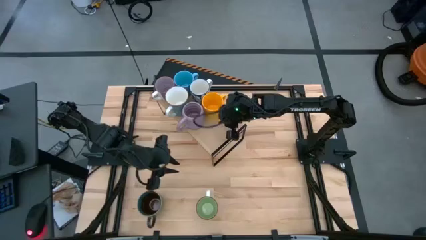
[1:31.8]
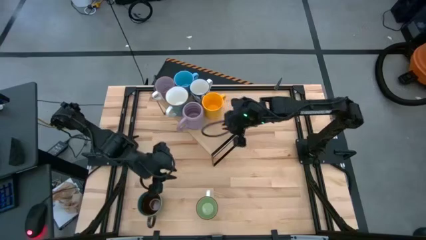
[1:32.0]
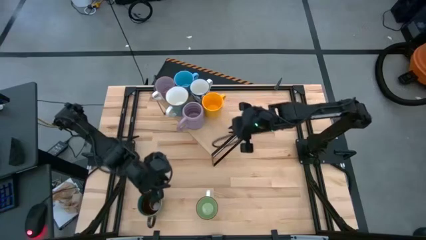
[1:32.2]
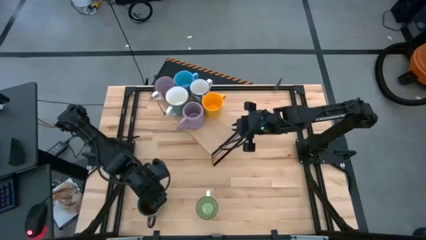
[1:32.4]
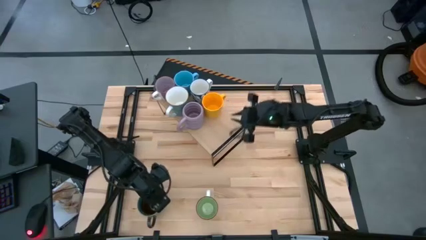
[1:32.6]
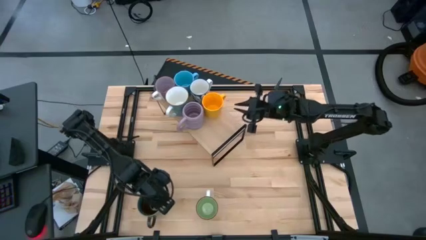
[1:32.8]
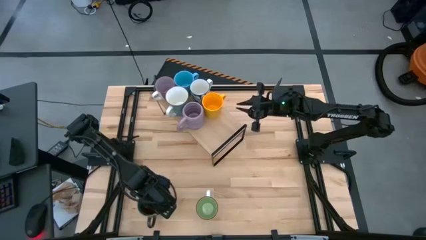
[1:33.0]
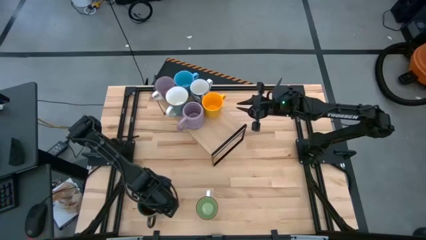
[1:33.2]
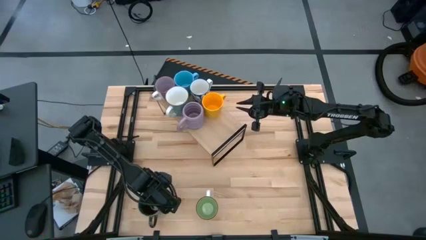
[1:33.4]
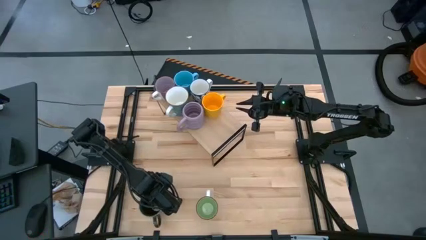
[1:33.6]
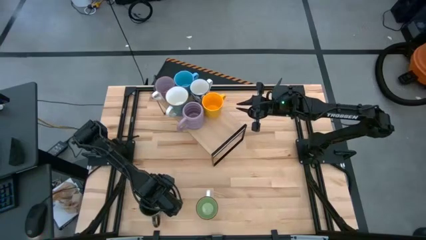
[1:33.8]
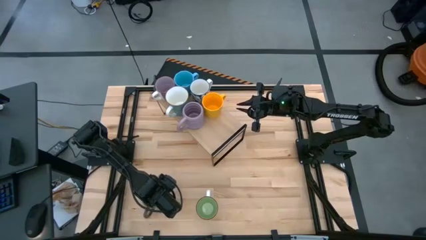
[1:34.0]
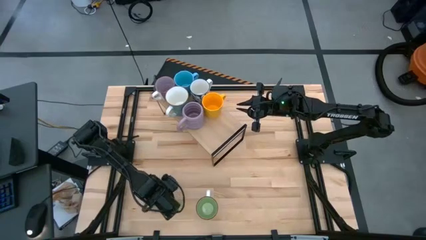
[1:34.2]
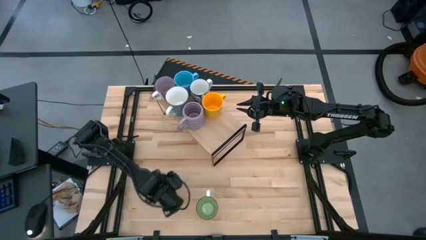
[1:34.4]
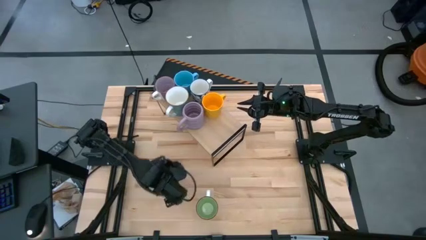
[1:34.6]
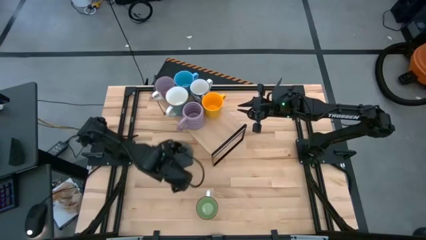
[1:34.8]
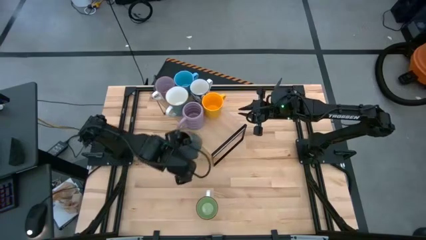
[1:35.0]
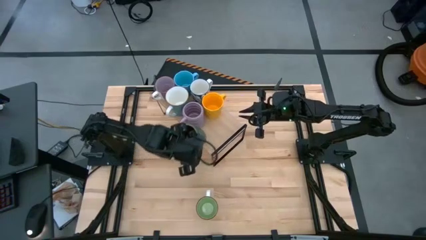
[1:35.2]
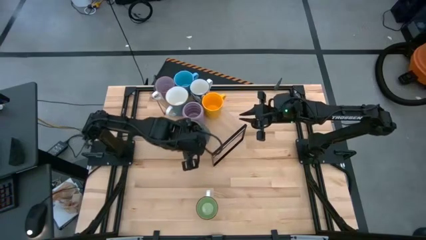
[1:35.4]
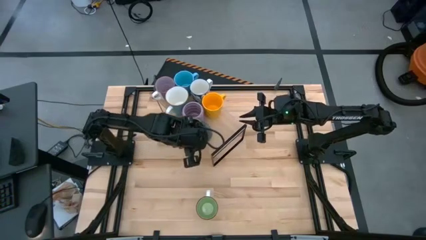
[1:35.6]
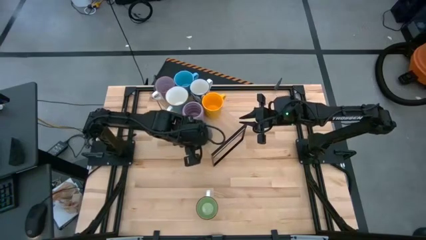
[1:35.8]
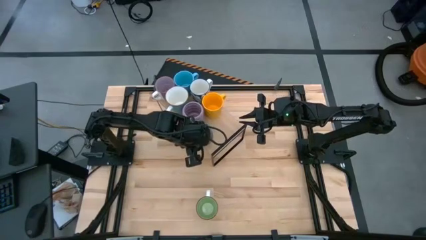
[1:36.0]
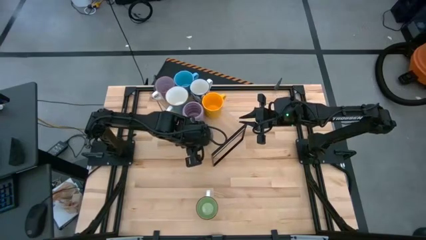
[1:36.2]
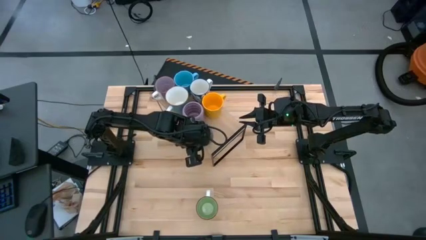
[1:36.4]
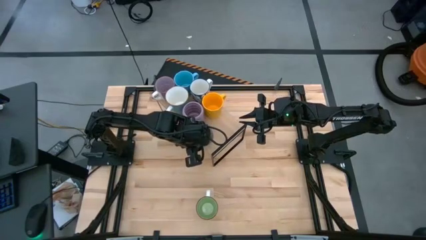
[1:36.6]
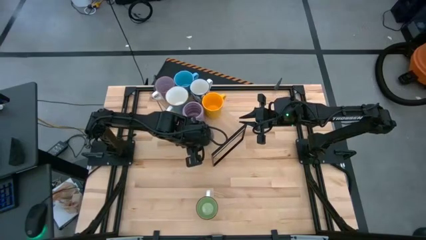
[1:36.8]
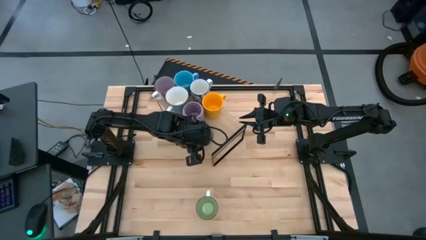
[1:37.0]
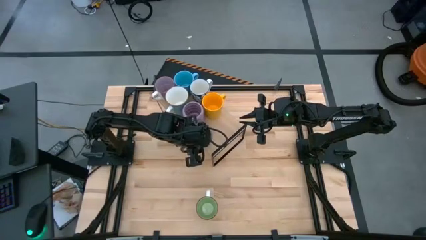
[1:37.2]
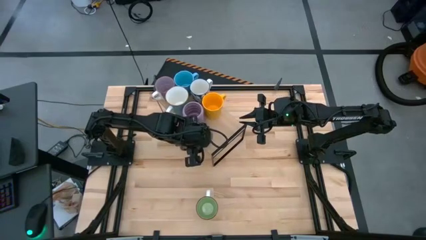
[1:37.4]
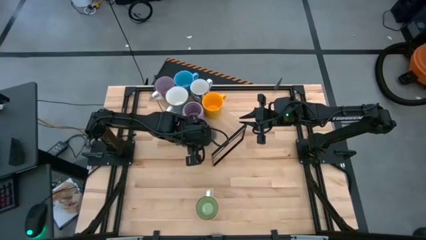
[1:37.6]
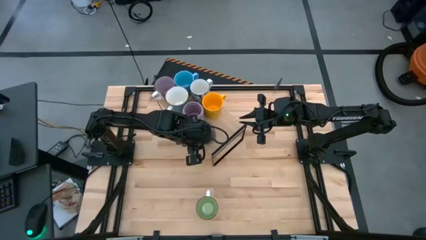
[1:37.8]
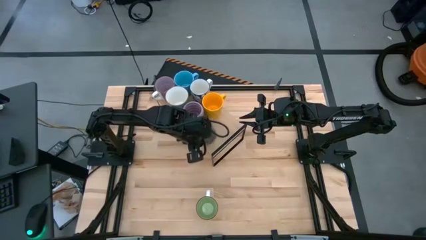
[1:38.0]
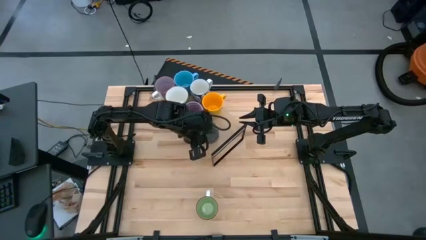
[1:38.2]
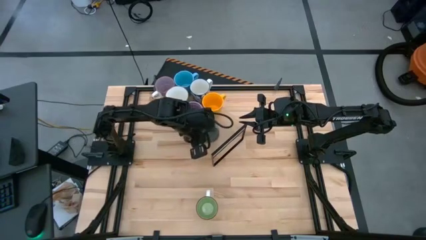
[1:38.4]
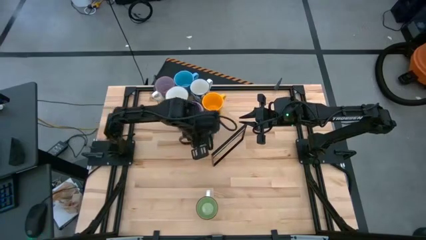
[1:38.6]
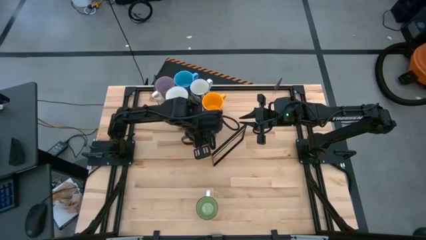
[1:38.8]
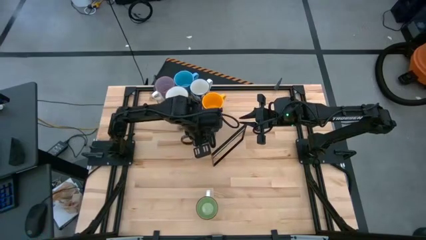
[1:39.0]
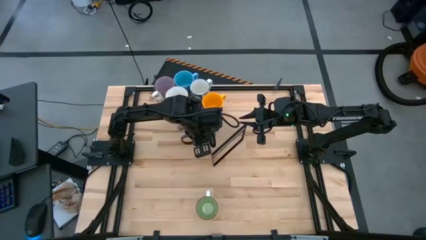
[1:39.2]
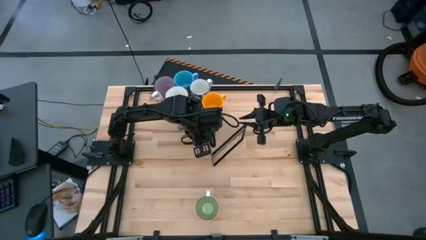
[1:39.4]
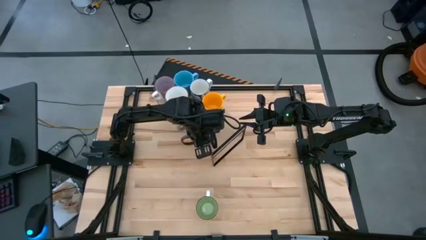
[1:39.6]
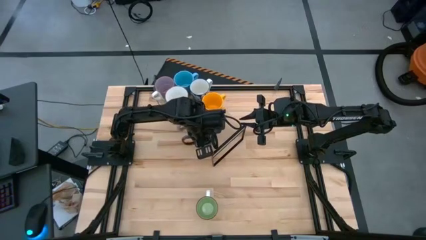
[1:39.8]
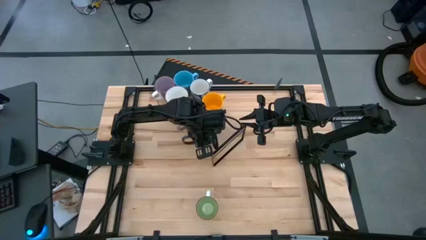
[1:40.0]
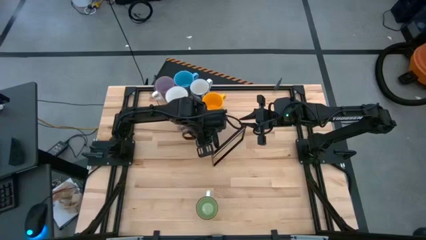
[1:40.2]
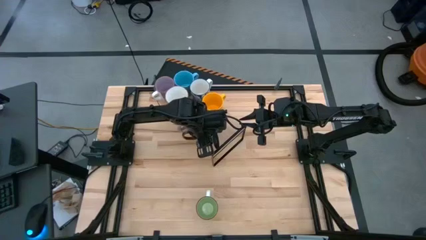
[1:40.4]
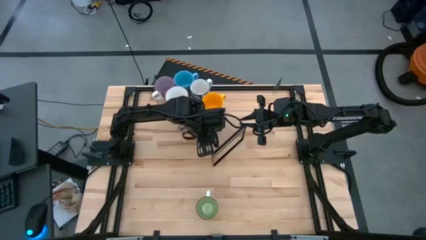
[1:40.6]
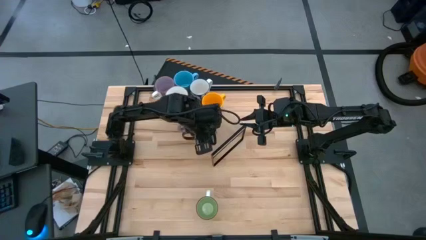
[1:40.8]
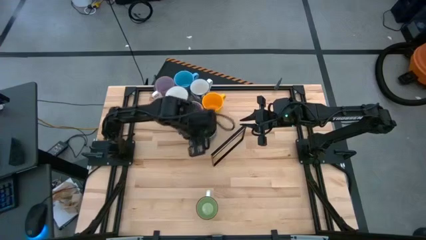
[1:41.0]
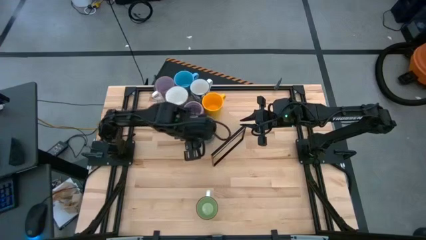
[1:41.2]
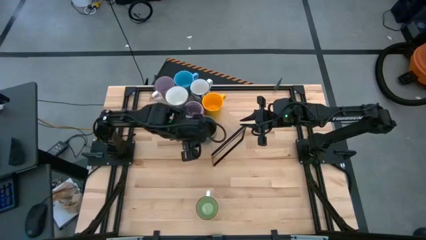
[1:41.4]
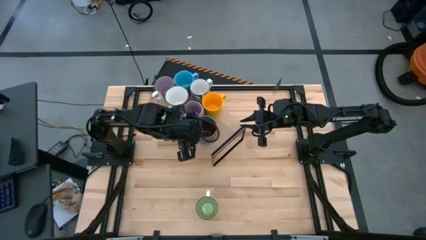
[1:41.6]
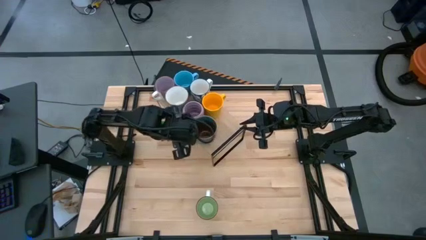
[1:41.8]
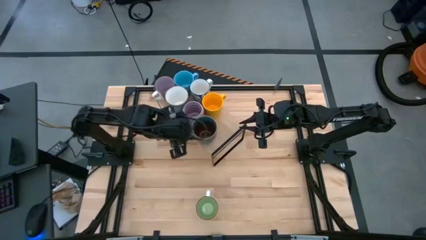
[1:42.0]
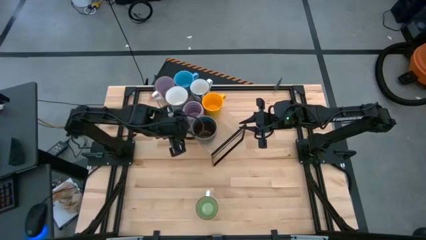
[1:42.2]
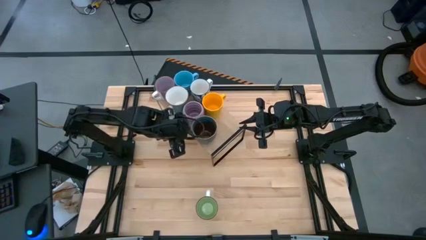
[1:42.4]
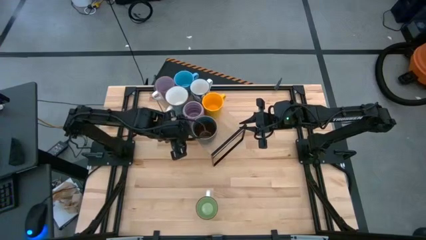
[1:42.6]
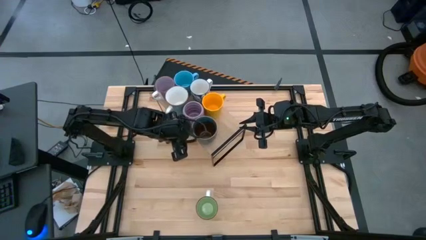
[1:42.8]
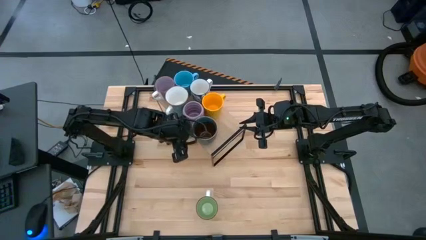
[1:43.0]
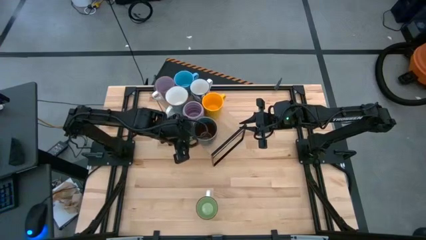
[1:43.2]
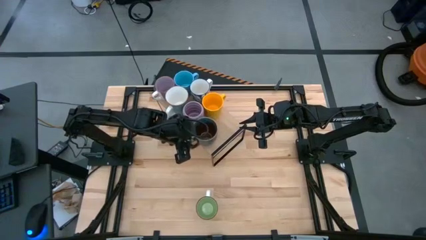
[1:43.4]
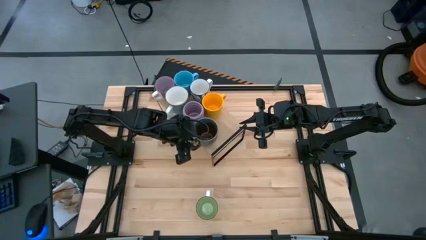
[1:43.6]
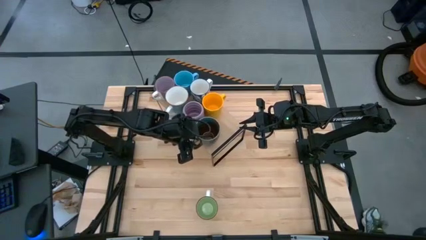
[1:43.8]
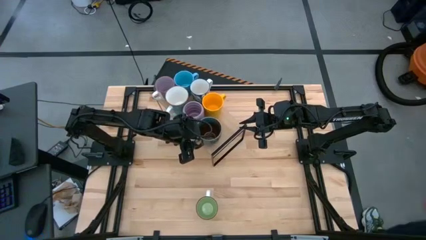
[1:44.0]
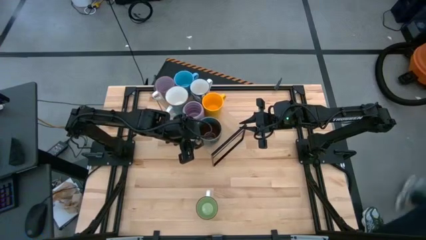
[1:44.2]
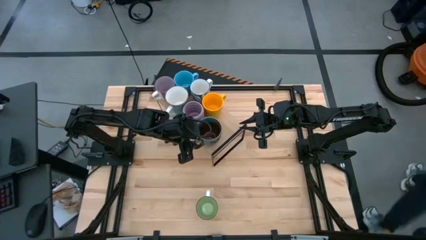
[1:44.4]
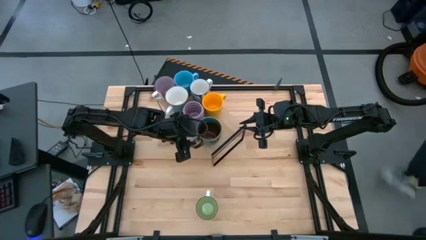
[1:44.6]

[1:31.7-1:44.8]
Task: Place coffee mugs
Put the blue and brown mug on the shelf

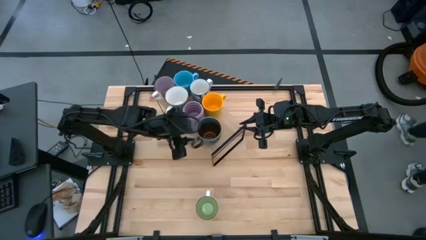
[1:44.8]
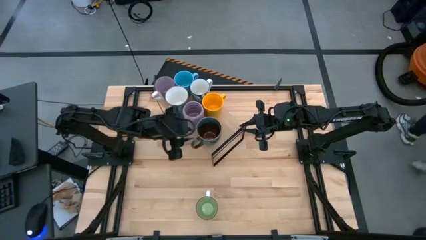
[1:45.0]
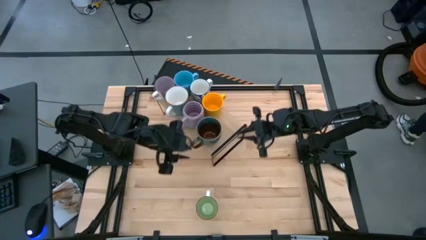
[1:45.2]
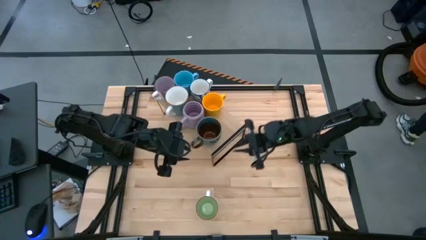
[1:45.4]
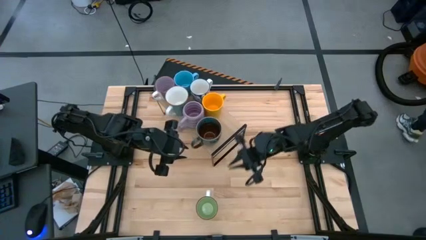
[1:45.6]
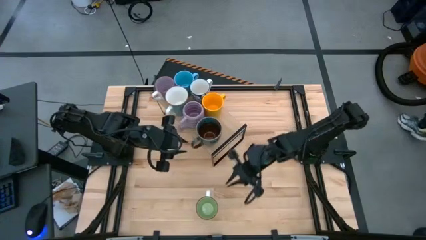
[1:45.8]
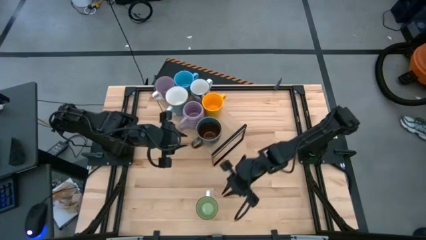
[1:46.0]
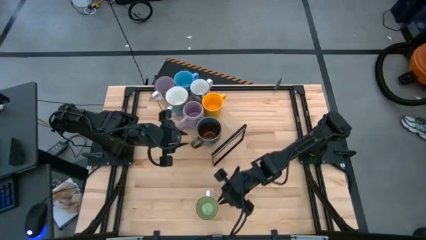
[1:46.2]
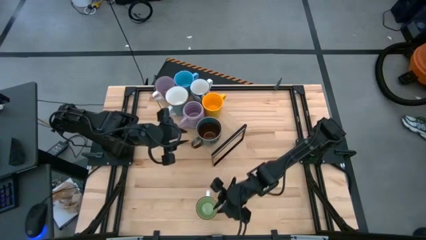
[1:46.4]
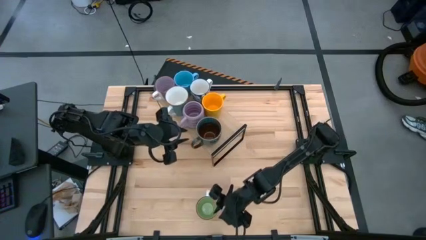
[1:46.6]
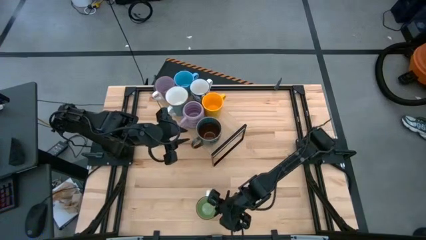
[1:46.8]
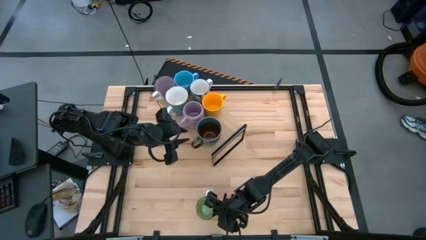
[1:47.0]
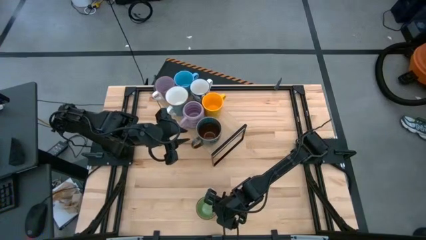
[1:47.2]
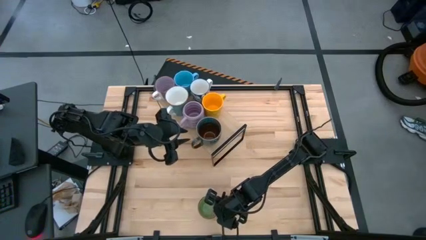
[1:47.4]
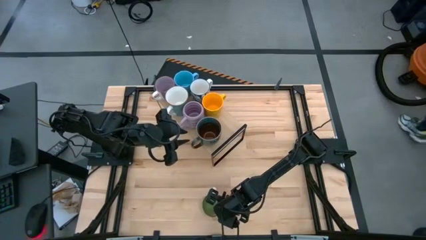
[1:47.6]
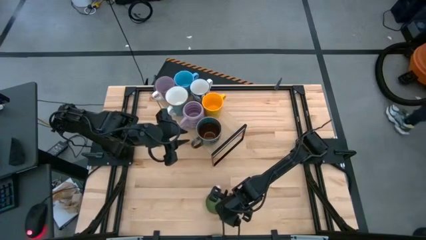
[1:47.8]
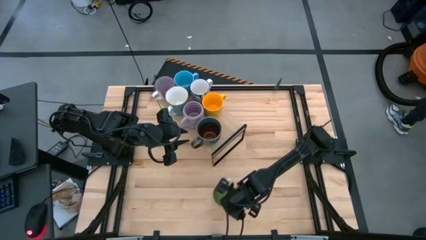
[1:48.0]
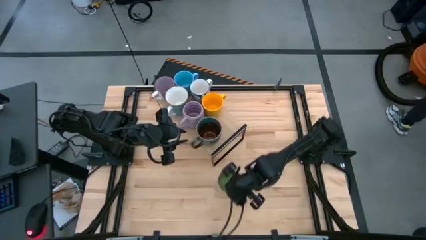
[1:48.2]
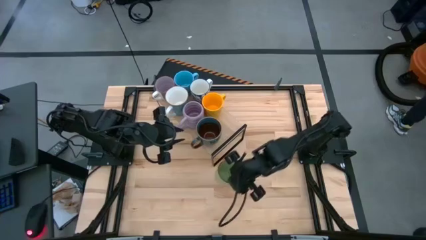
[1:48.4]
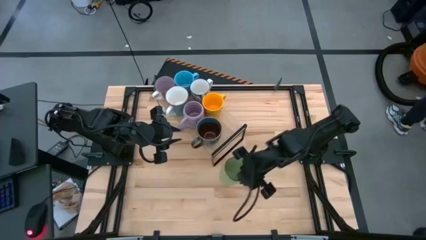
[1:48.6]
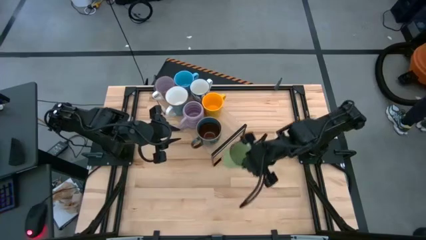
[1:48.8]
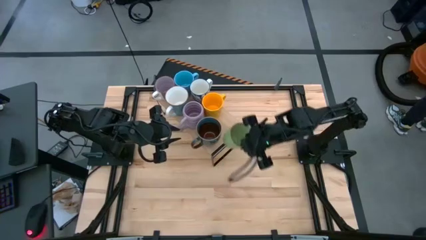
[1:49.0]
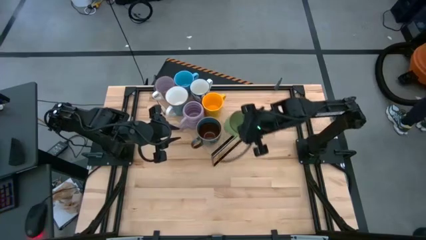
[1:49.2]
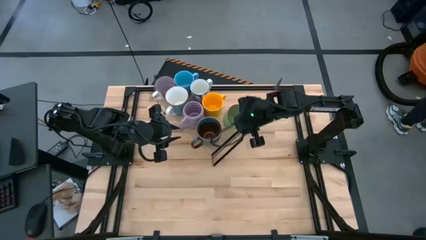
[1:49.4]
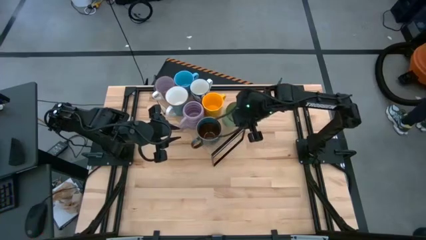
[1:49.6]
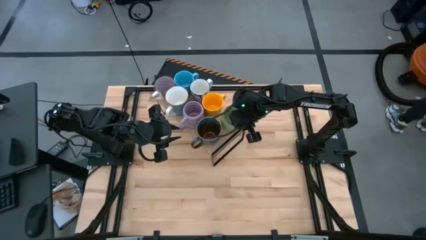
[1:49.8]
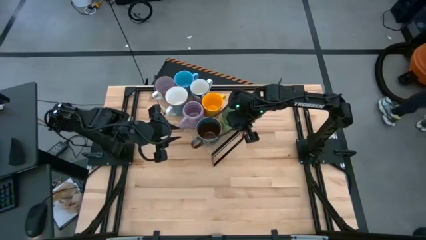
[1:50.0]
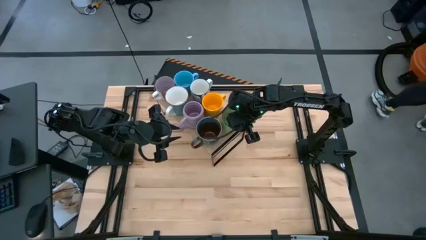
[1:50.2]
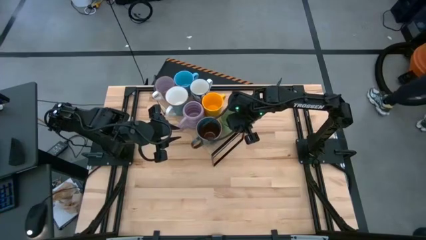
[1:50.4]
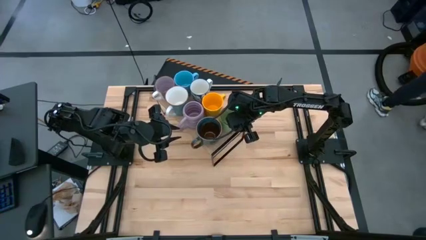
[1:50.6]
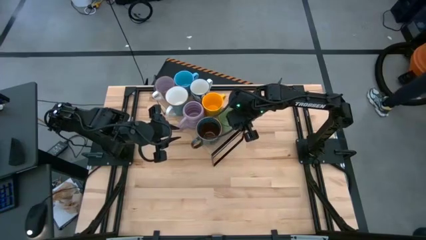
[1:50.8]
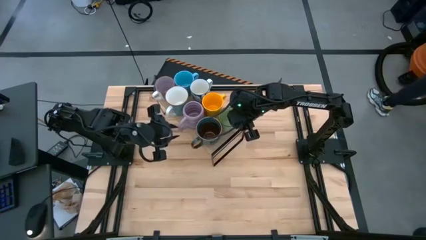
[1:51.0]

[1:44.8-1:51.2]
Put the green mug on the shelf
